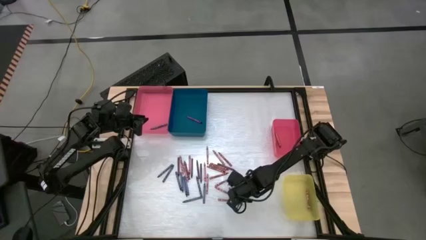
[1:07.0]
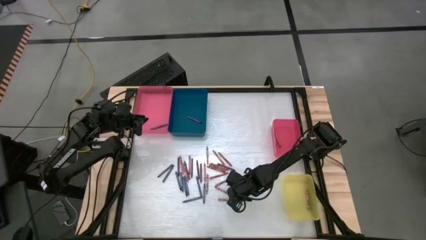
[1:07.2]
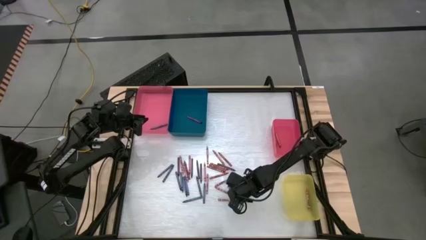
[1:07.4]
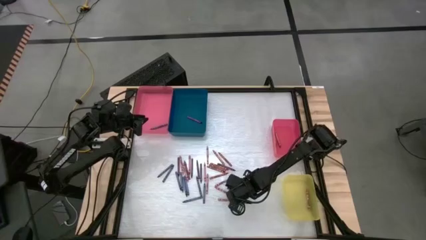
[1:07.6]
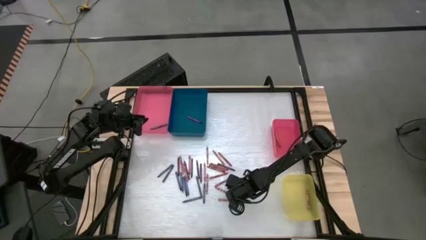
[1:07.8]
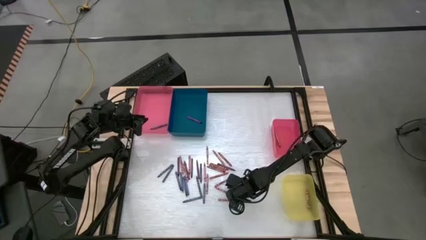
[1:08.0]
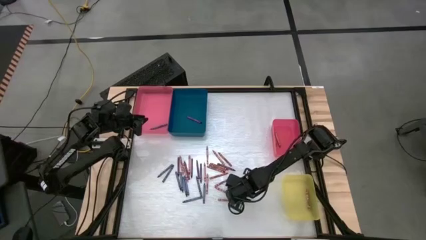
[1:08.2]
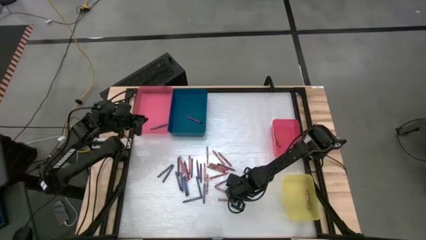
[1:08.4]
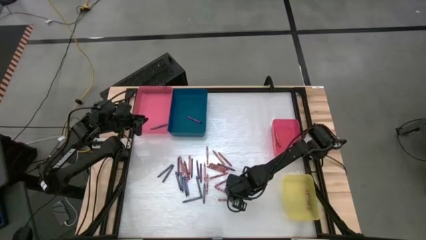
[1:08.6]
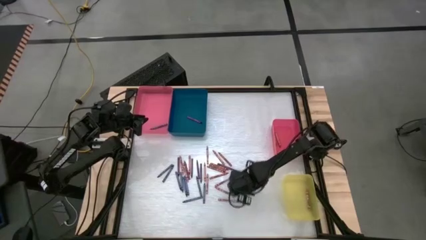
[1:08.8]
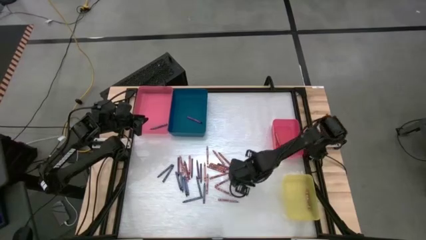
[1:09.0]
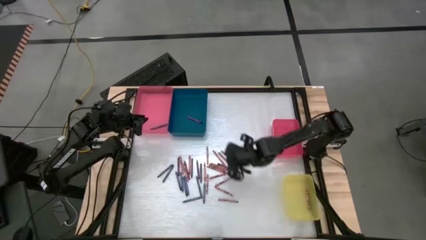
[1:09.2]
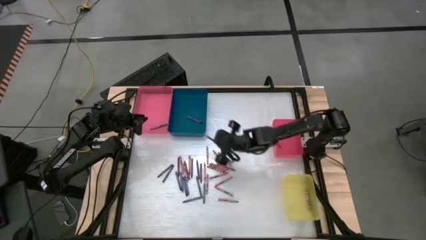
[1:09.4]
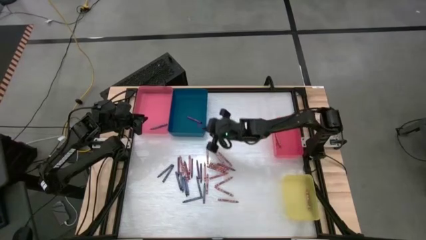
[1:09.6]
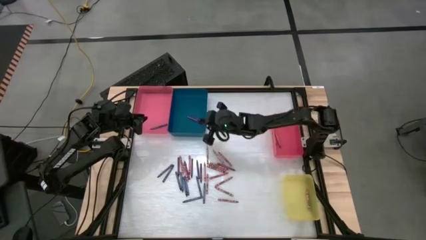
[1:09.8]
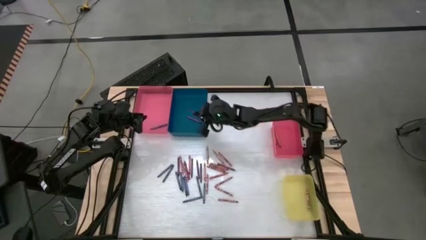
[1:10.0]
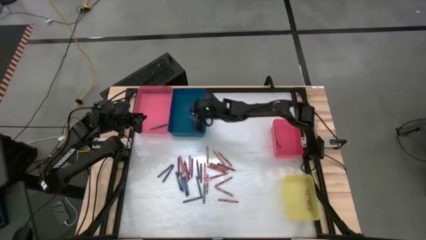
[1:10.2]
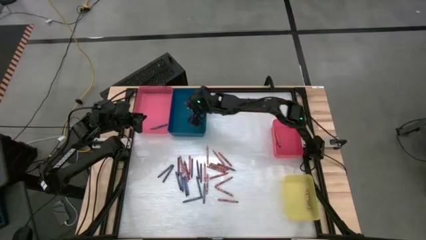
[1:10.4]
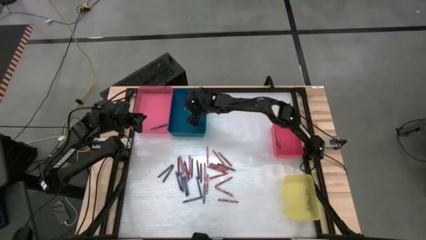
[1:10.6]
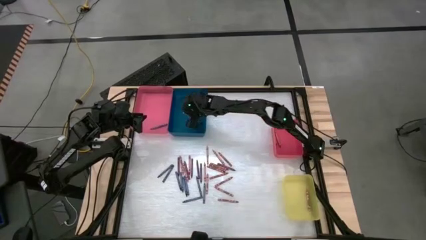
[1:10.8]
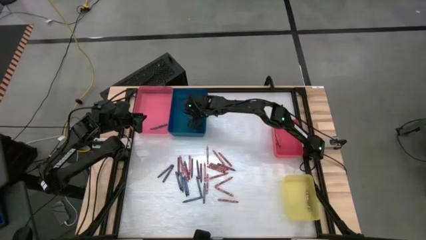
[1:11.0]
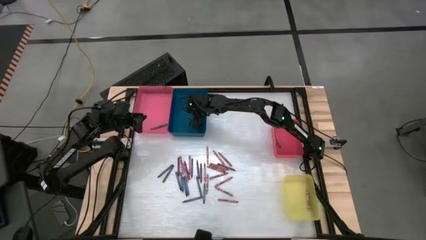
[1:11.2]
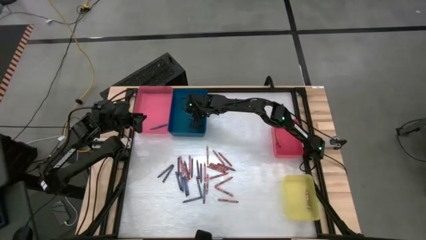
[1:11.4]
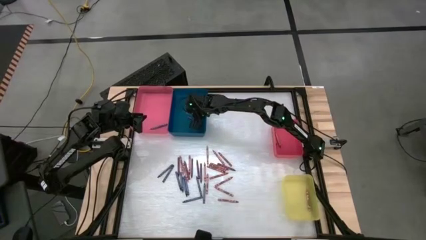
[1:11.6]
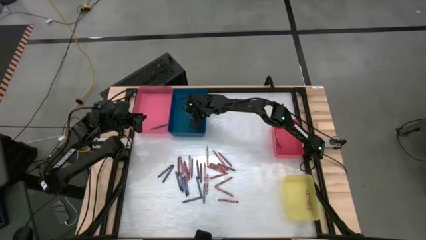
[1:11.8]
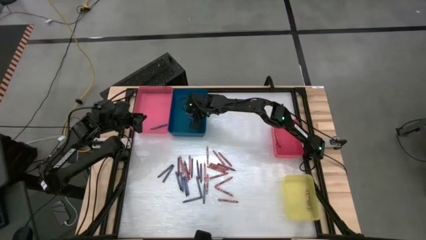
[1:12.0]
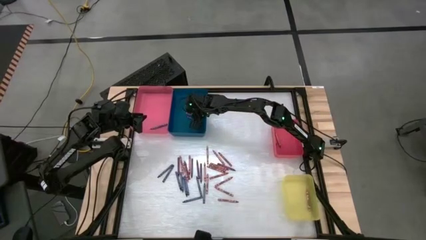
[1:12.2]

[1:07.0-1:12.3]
Task: Sort crayons
Put the purple crayon into the blue bin

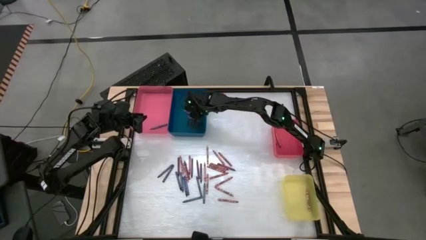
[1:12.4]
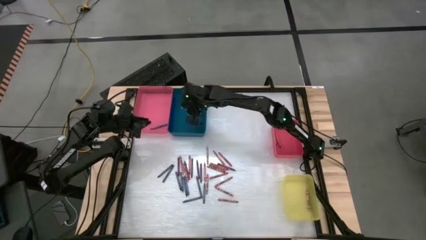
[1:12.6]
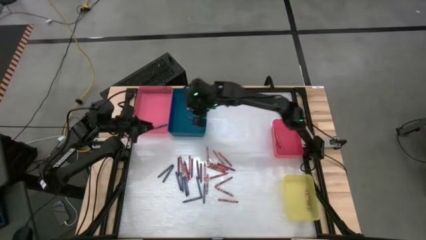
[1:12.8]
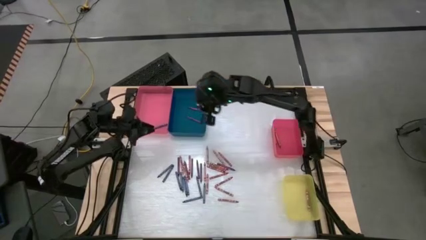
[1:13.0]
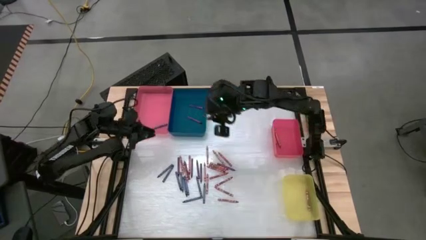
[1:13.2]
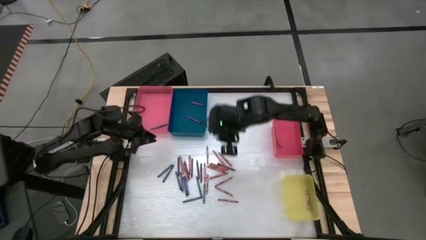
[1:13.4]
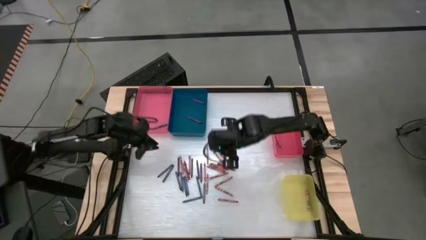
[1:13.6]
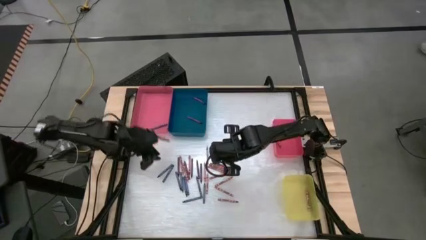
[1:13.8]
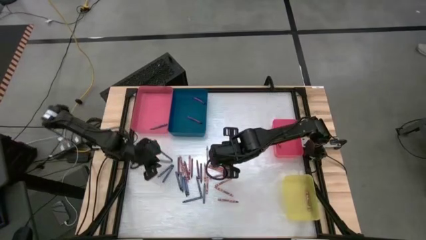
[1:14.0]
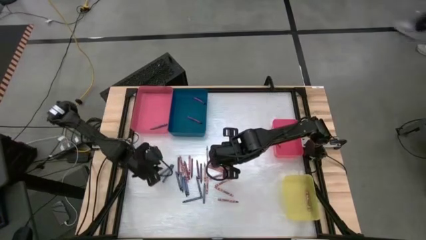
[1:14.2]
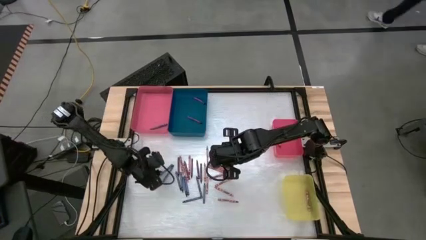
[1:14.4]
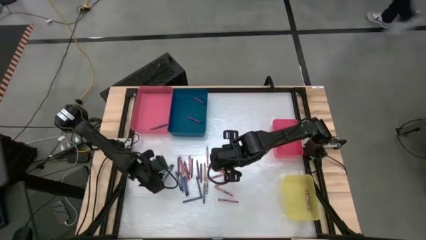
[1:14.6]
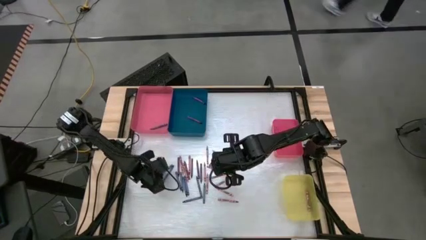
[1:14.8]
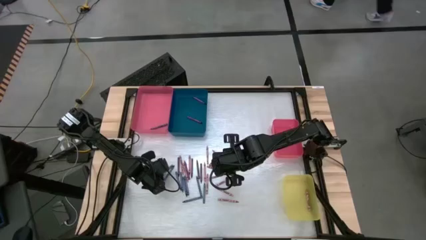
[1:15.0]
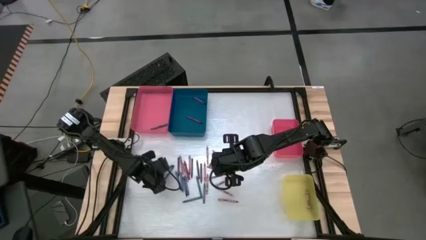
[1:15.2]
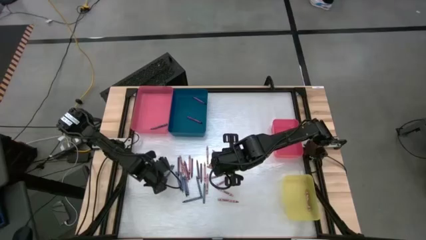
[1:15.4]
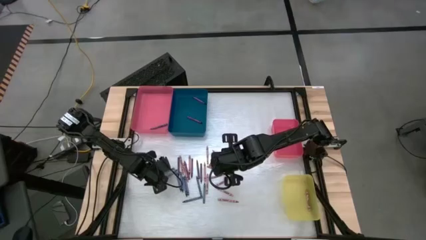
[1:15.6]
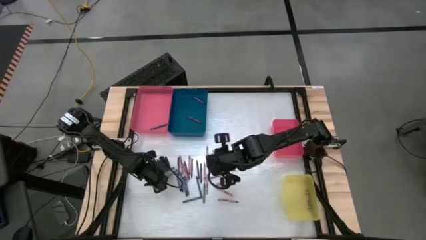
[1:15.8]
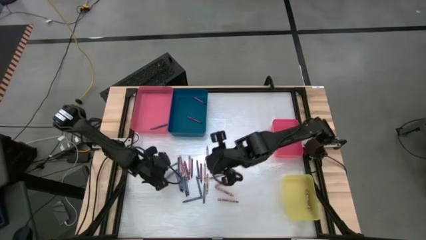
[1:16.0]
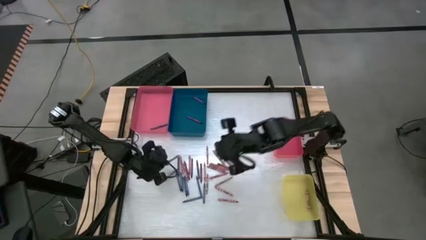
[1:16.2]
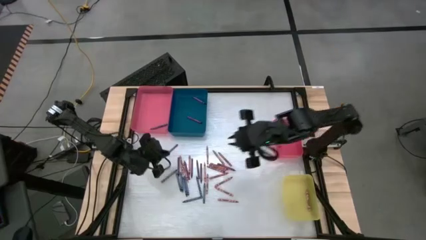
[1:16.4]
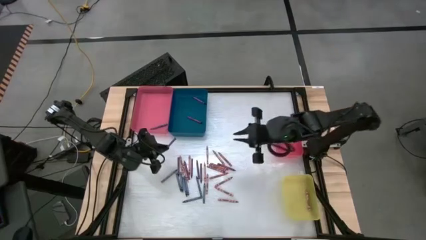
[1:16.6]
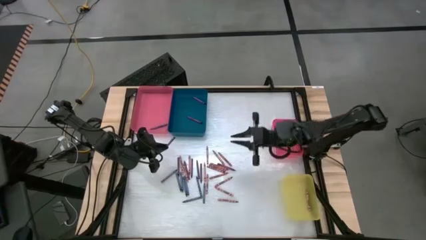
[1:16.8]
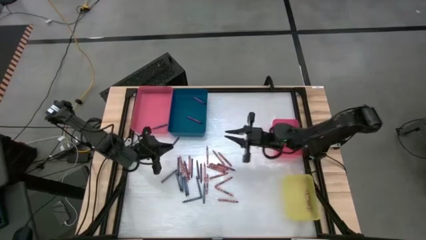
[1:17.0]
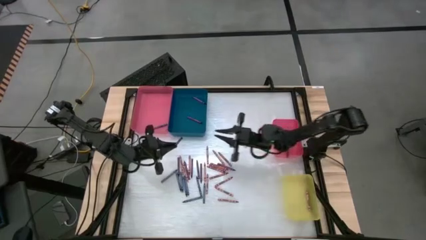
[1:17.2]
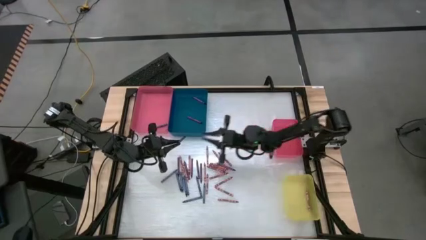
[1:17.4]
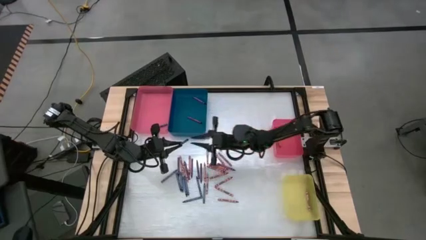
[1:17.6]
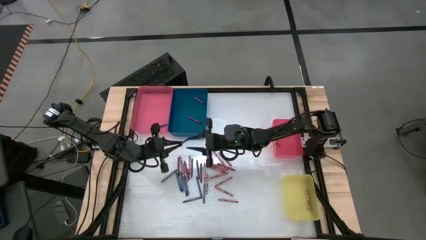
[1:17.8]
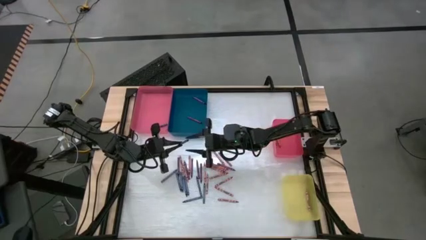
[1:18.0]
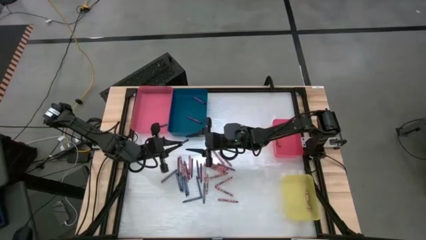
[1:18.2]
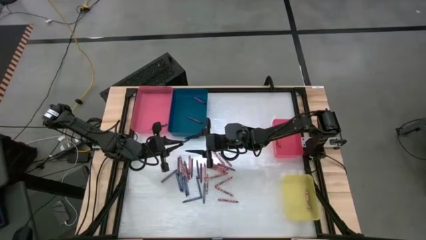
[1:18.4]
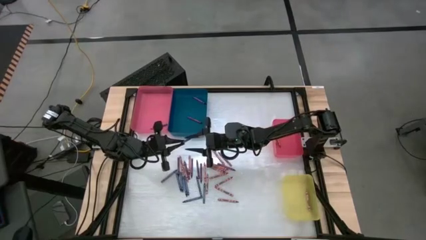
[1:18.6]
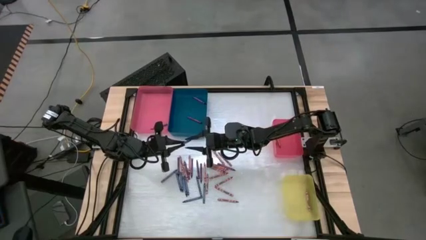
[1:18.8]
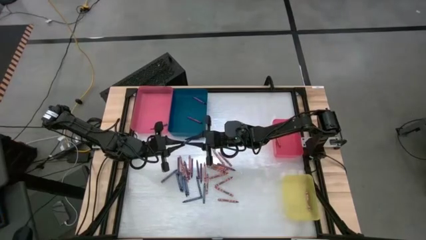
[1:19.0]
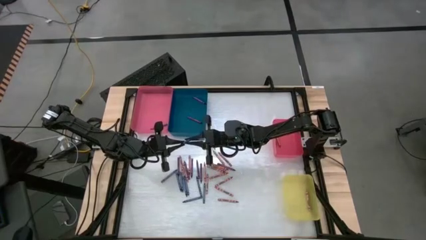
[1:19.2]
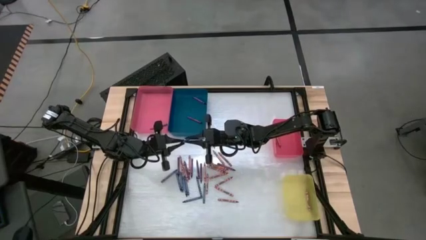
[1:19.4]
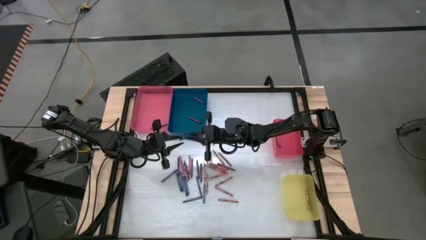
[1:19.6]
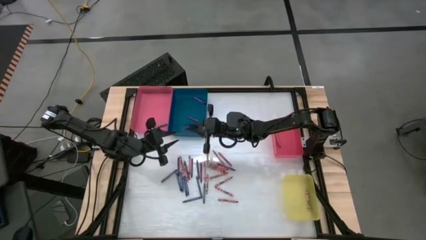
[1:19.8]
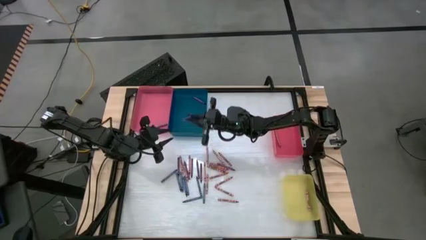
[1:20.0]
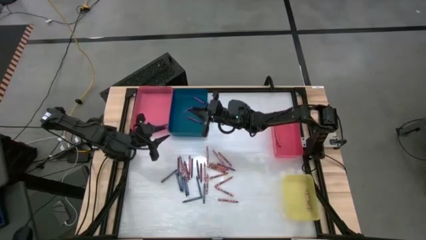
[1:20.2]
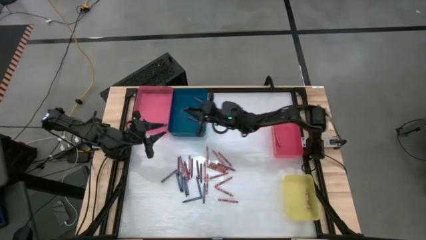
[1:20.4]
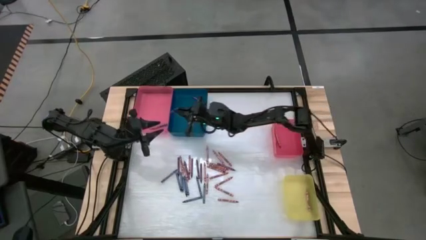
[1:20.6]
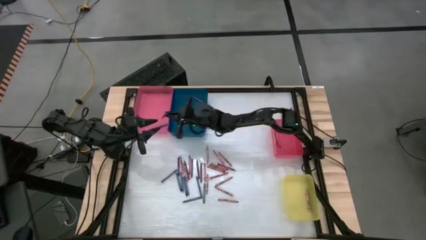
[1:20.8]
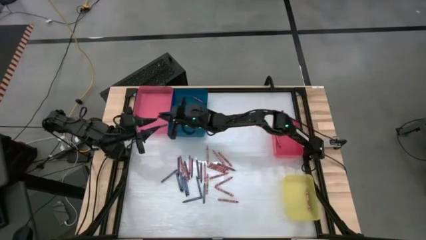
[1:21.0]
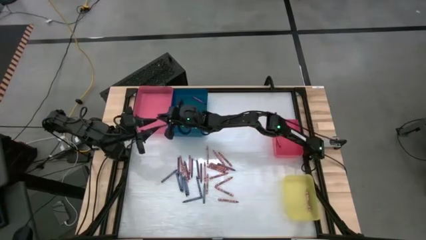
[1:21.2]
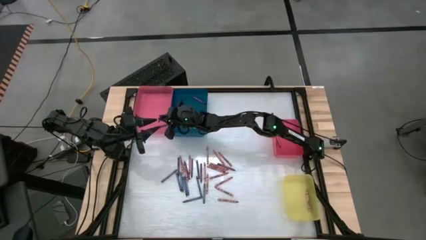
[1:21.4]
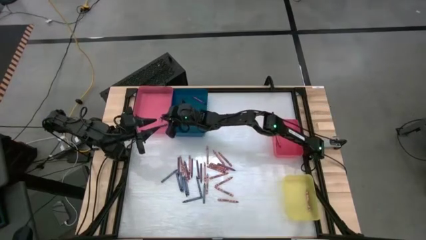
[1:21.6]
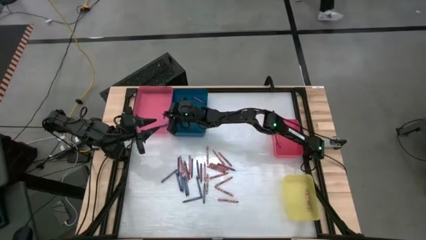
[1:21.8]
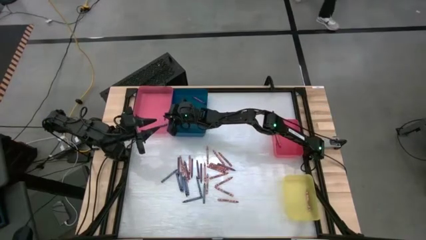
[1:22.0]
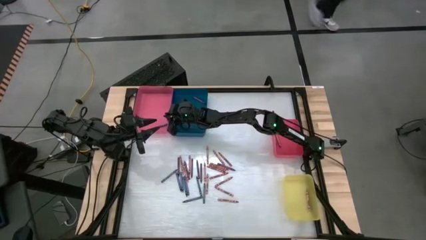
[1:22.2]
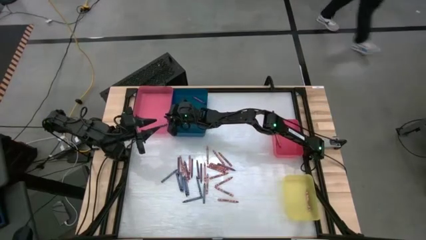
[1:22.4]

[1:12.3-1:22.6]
Put the blue crayon into the large red bin
